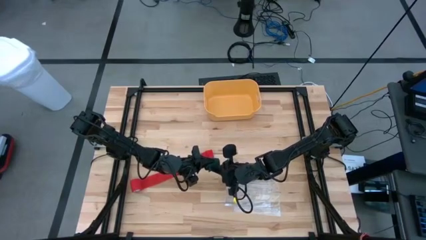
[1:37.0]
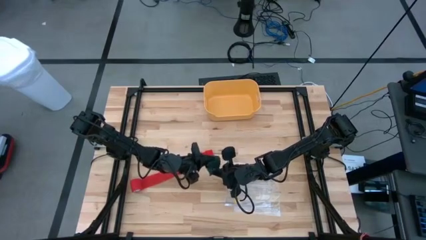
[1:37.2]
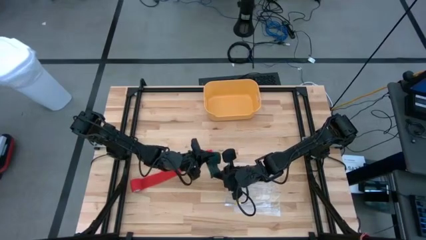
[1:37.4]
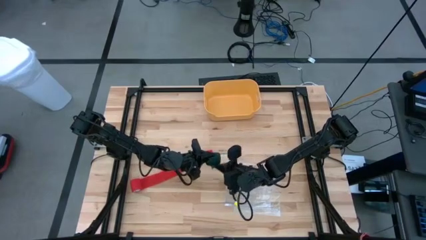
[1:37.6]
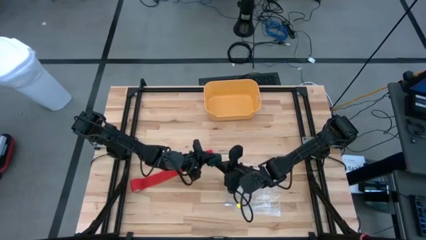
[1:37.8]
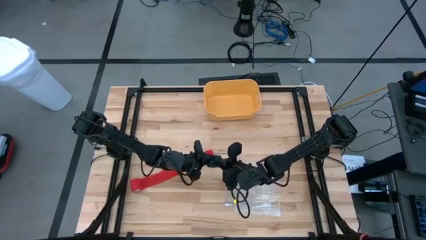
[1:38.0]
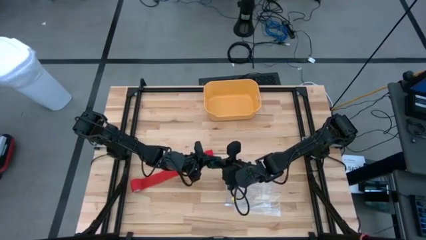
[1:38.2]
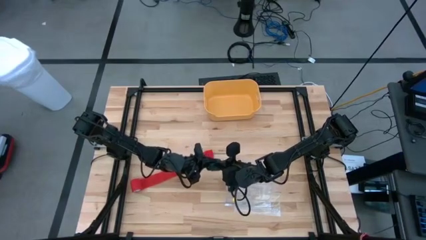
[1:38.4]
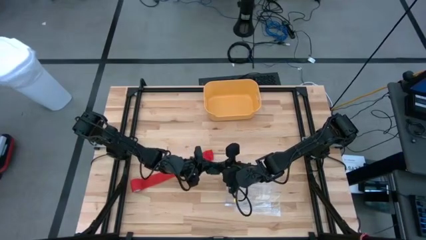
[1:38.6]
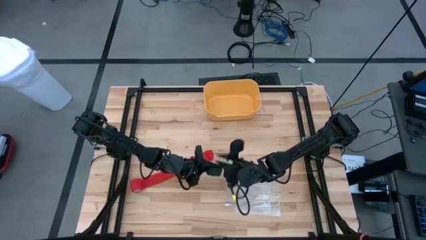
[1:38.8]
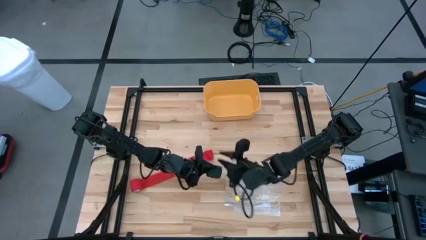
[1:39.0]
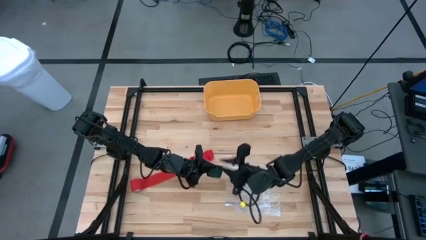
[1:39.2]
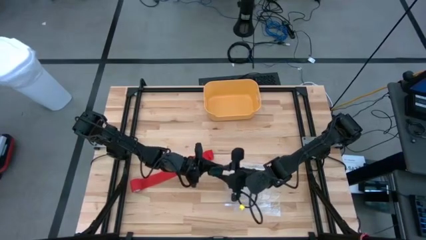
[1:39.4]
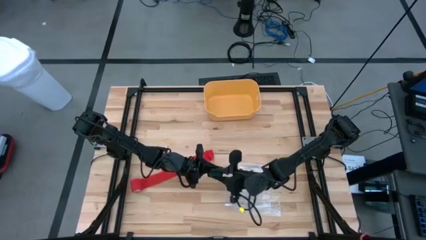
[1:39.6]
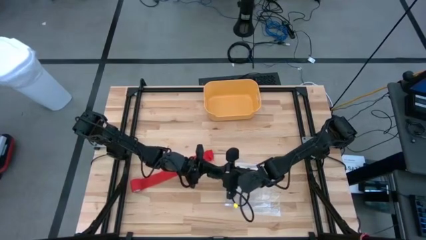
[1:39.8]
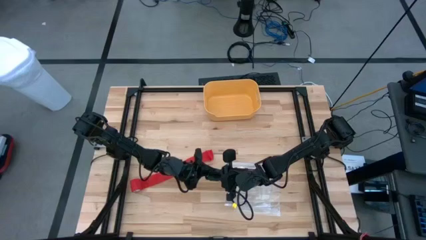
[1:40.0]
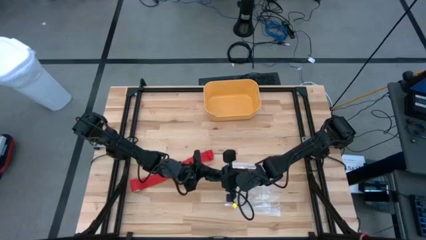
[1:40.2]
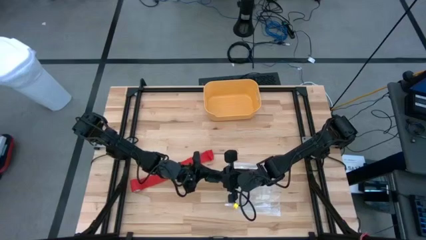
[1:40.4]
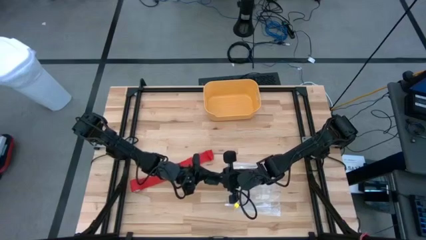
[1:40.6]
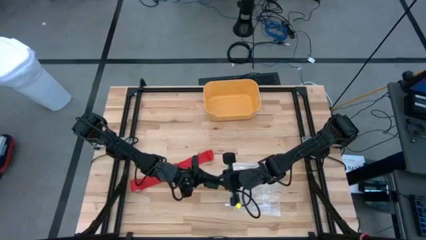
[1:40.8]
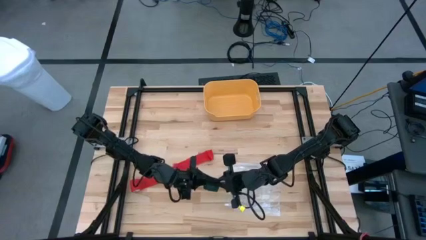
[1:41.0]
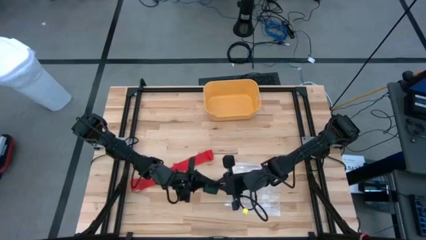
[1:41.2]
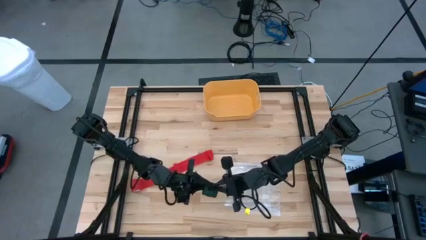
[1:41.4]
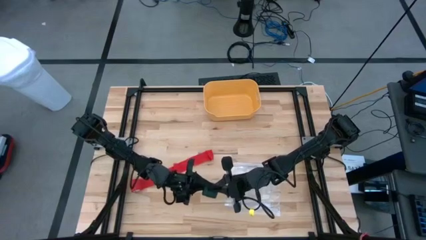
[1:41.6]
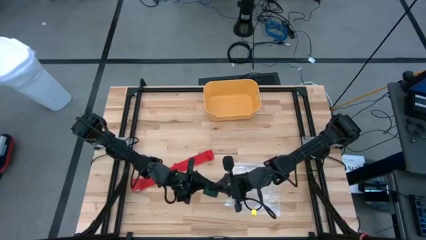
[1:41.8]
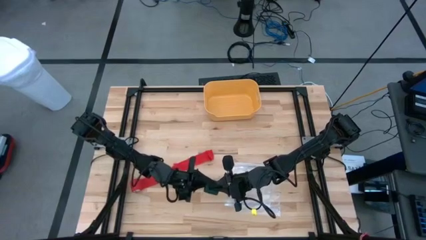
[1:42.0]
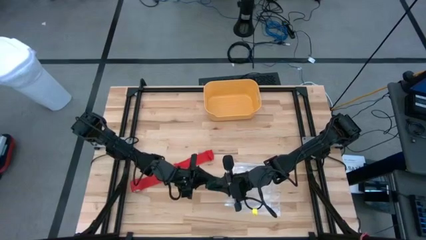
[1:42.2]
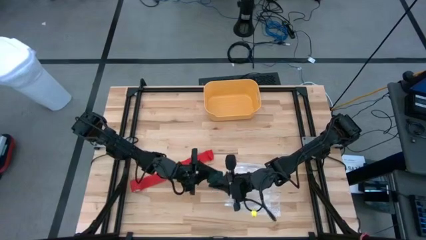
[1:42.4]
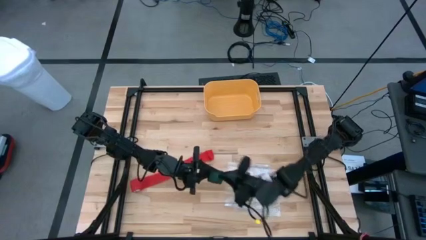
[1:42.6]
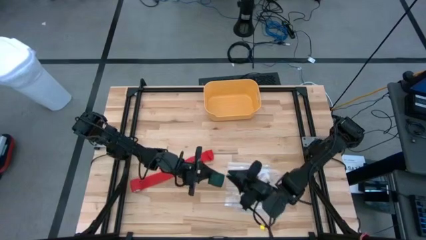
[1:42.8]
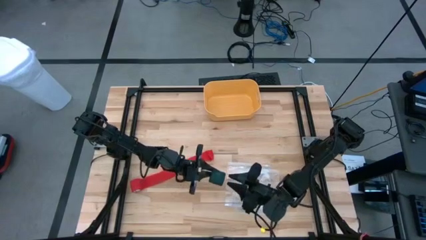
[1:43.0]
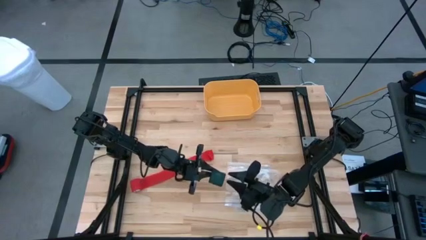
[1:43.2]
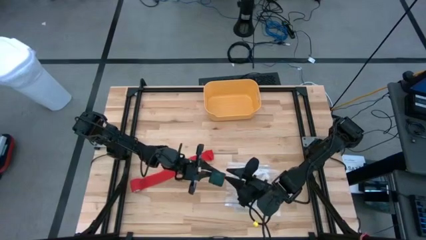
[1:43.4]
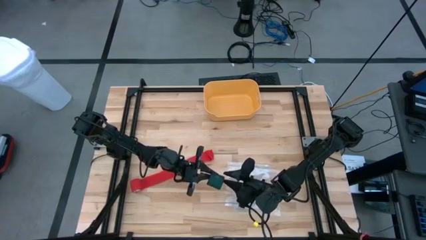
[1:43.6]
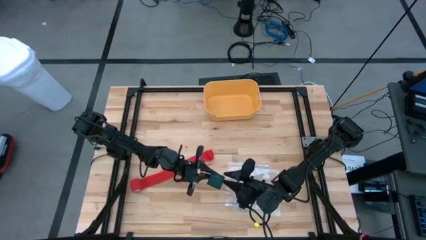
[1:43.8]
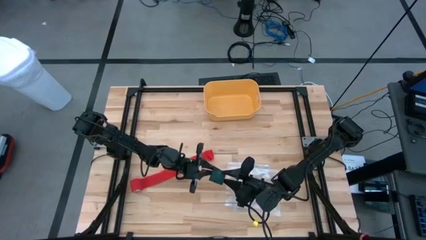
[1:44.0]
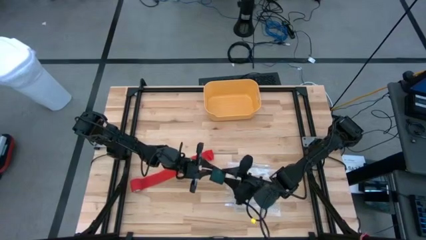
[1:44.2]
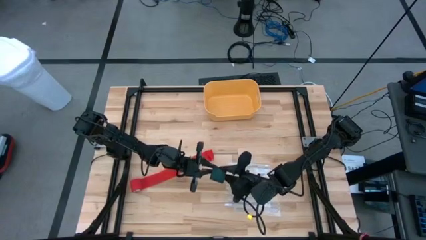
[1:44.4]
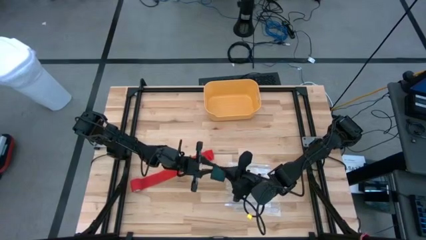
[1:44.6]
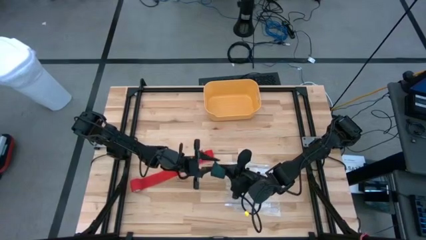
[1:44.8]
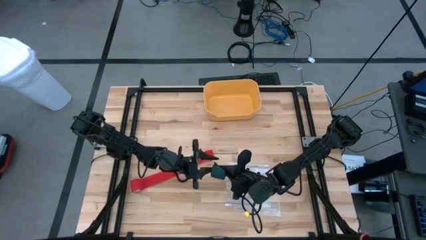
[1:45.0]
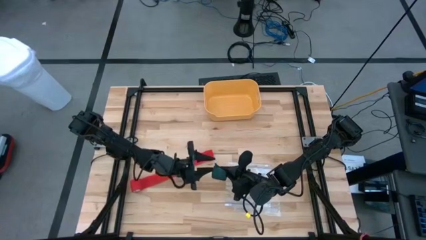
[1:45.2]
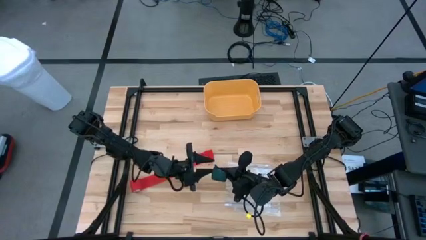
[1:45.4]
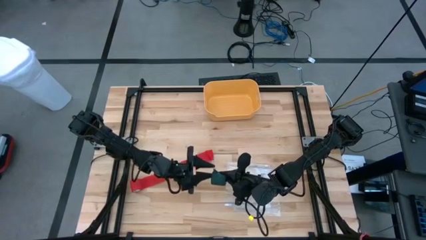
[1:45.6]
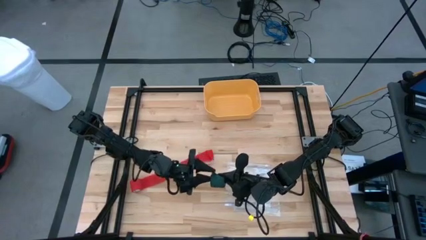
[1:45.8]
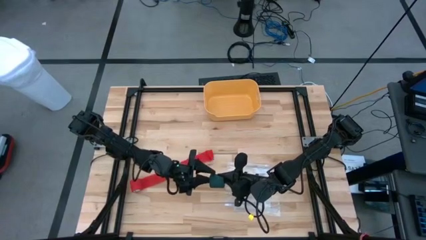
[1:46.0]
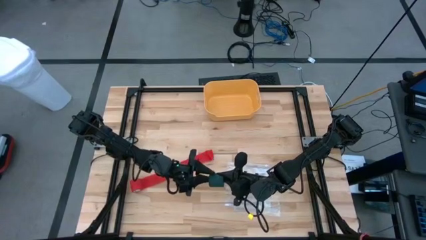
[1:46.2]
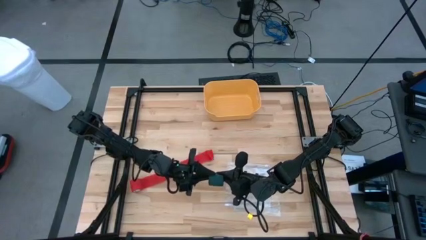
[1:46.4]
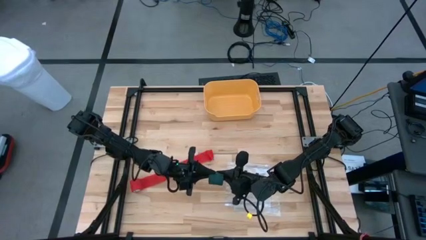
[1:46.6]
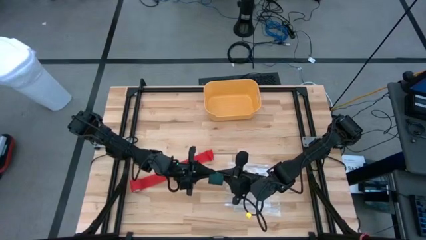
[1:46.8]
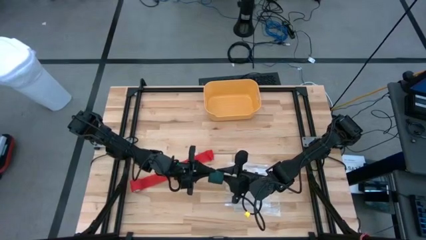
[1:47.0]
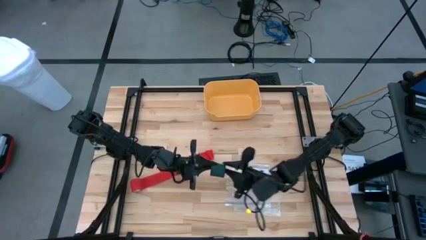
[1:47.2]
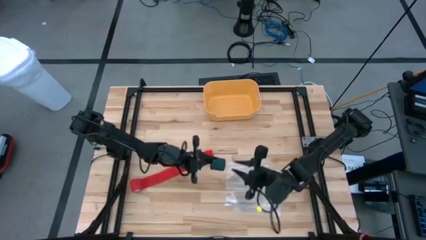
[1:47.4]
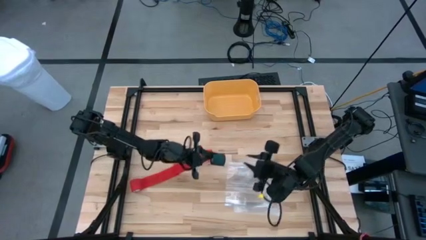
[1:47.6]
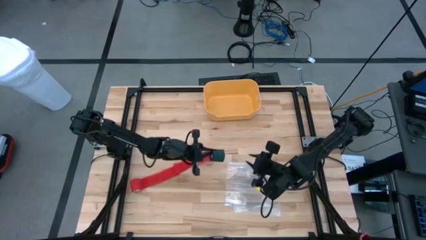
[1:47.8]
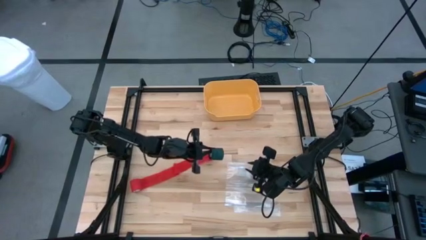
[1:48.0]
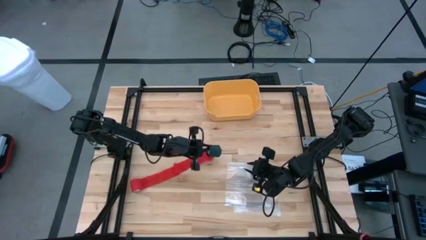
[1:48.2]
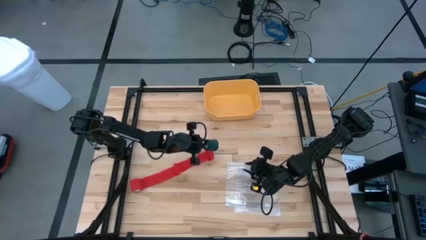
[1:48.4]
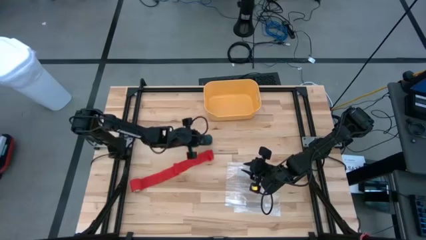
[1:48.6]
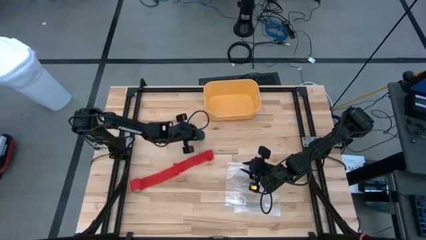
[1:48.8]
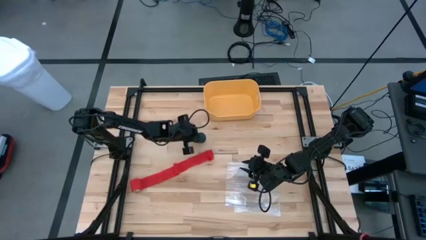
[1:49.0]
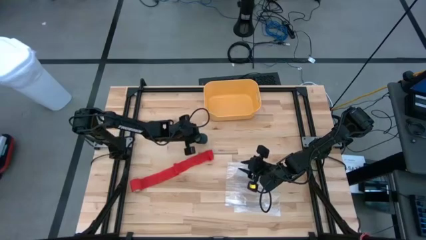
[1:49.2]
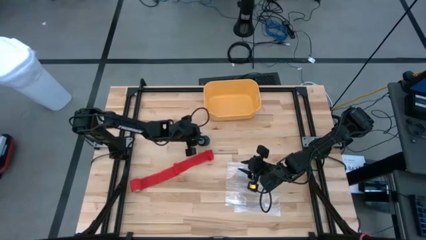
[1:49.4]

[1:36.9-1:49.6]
Task: Roll bandage
Roll the green bandage
